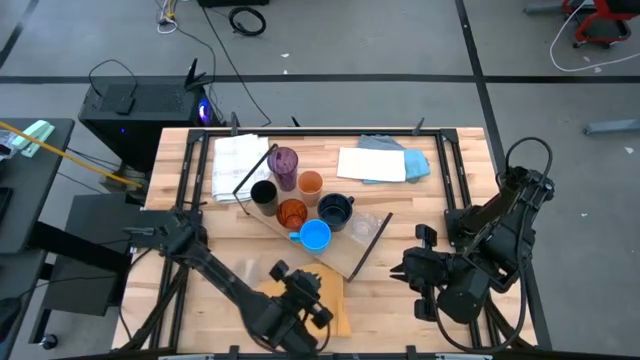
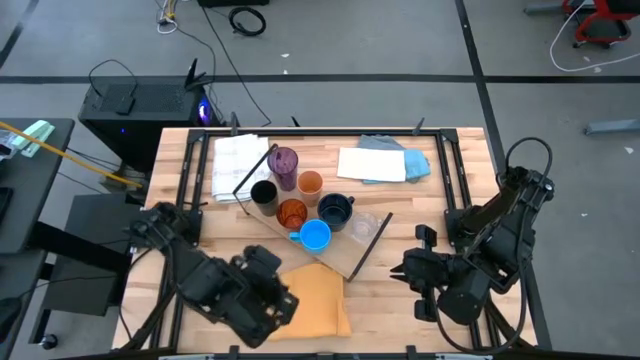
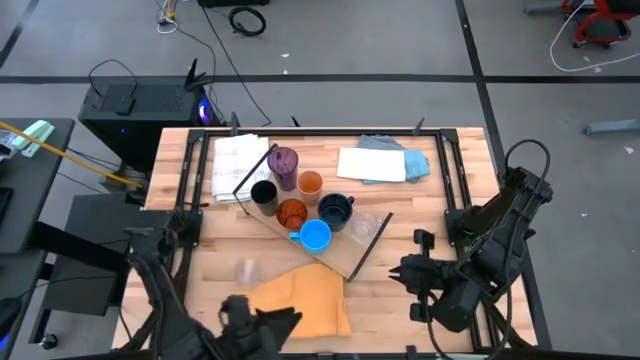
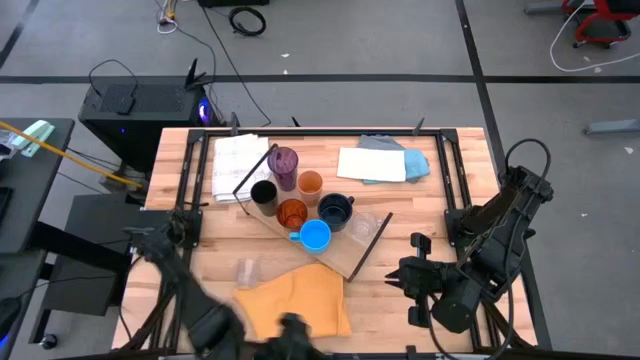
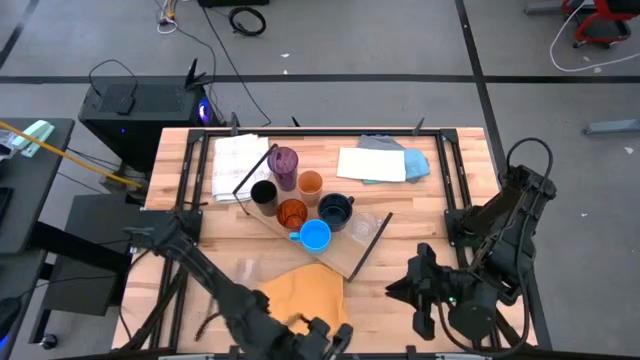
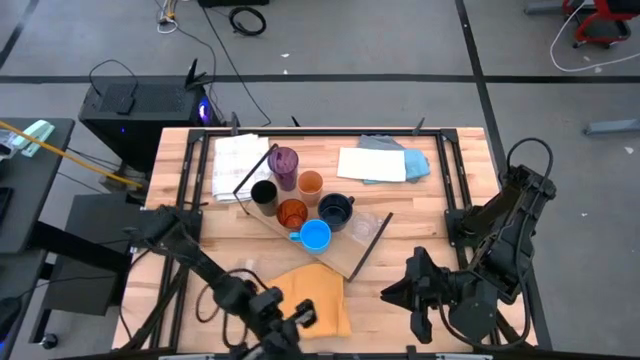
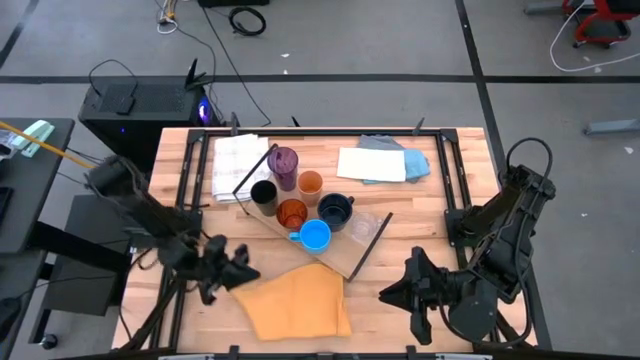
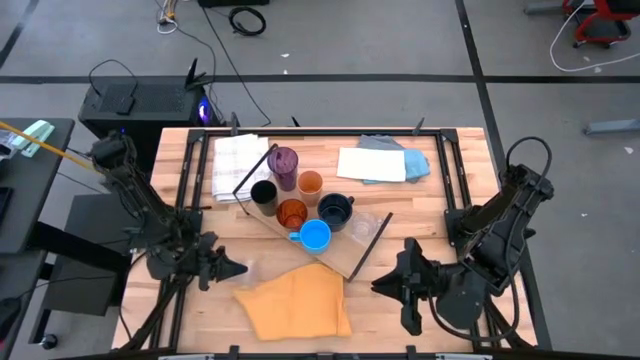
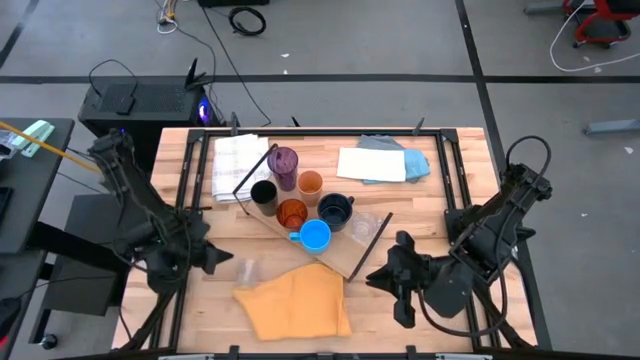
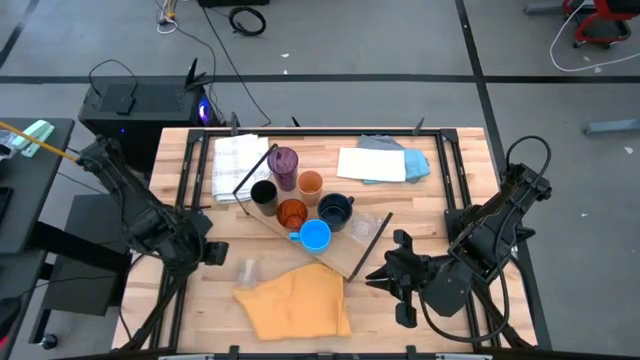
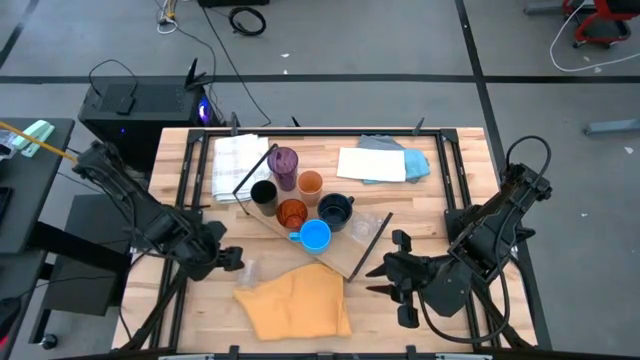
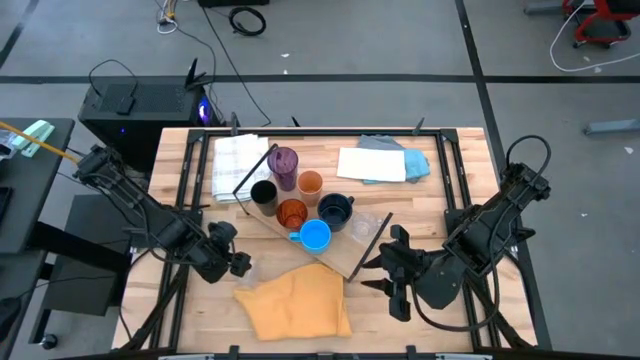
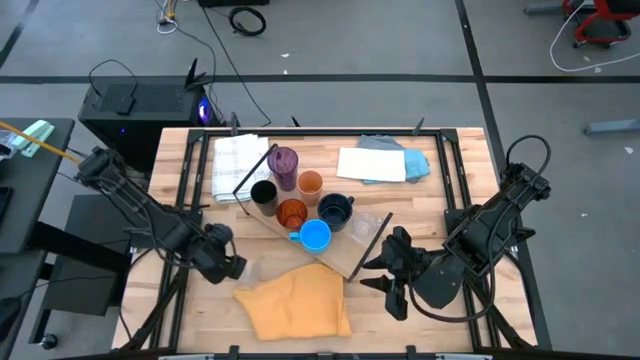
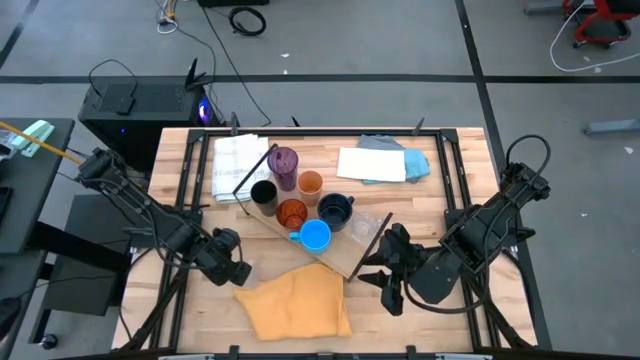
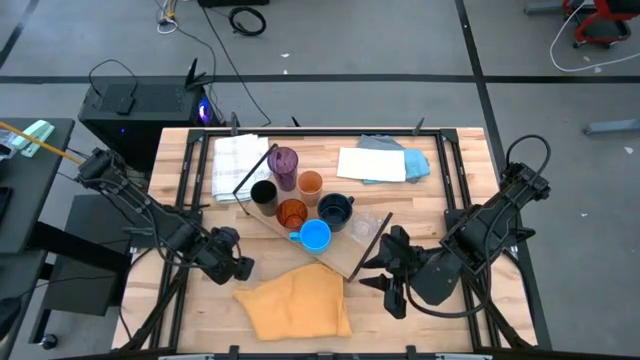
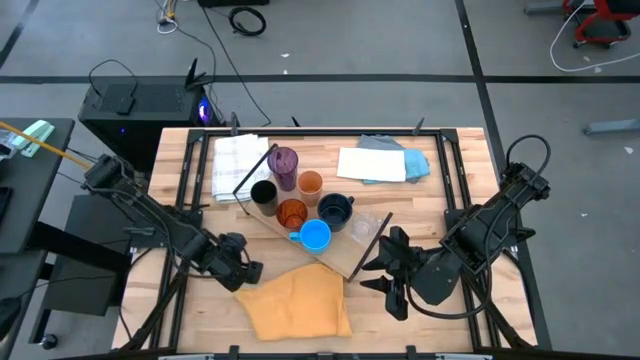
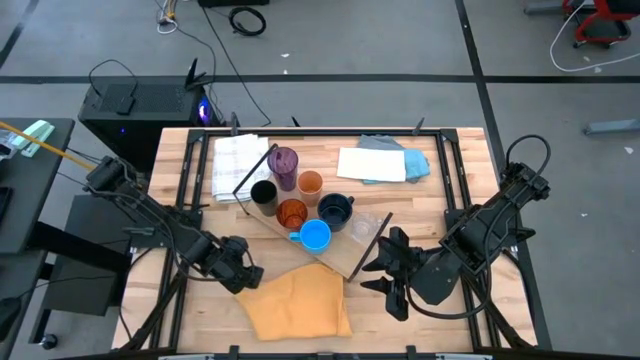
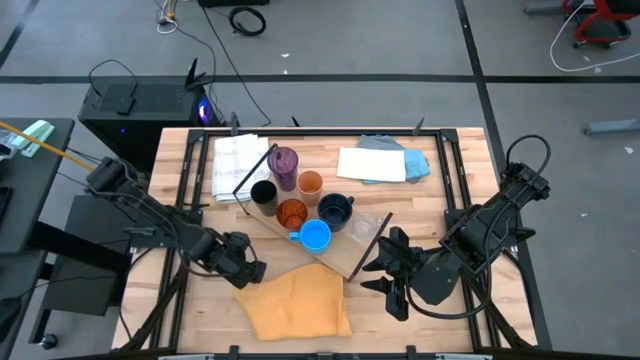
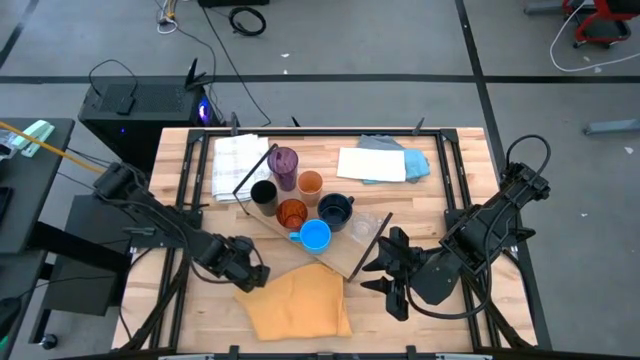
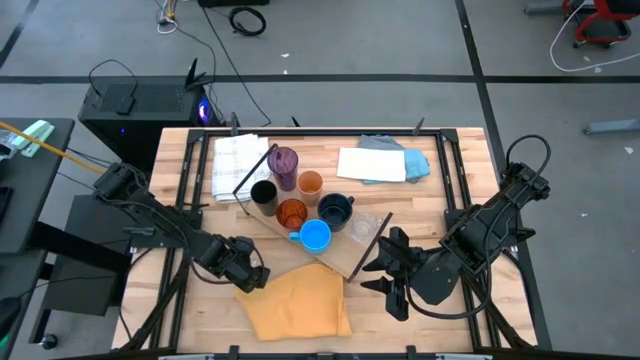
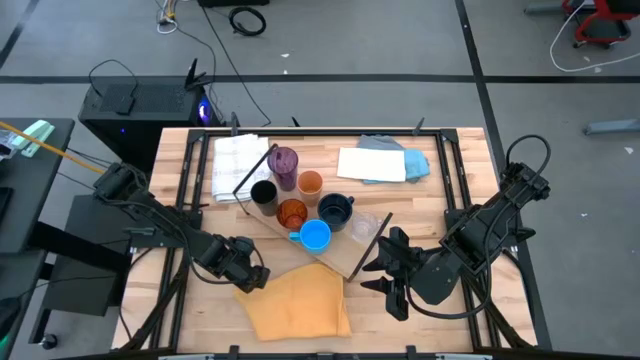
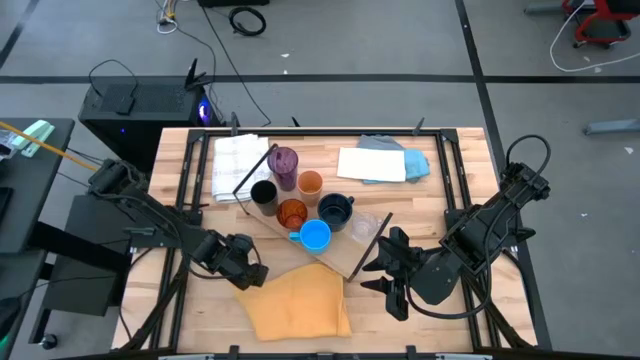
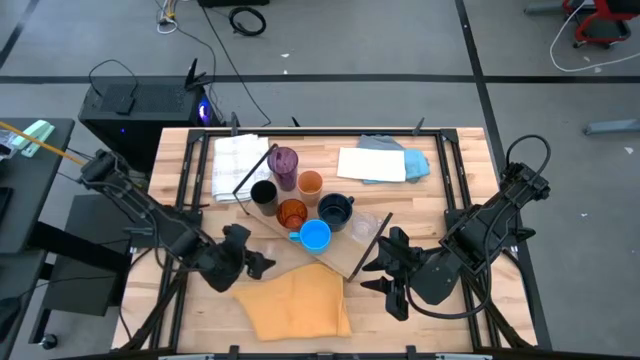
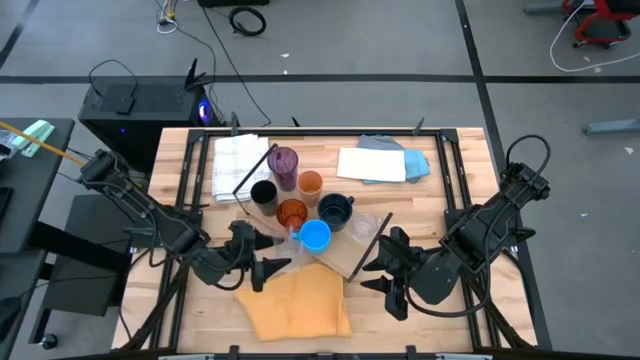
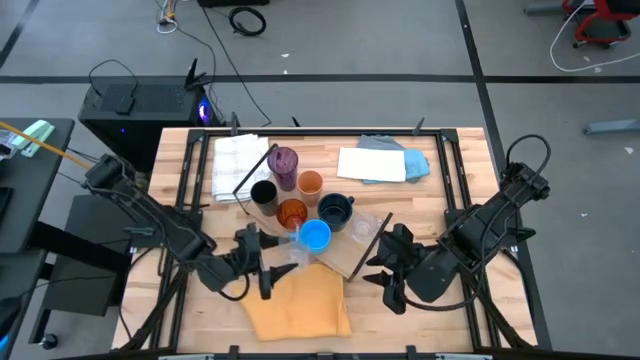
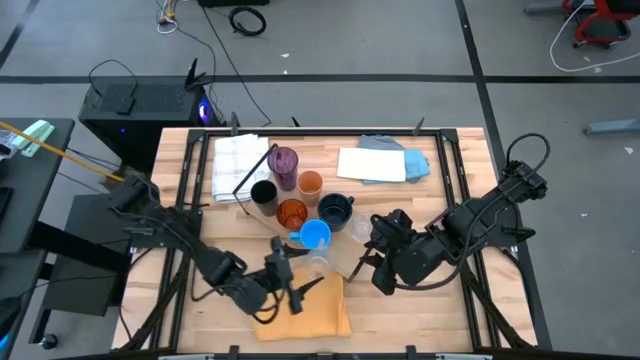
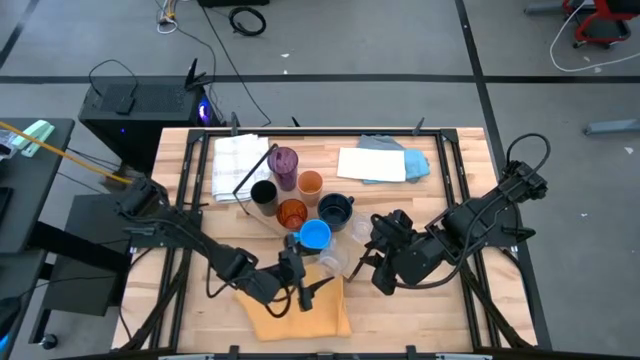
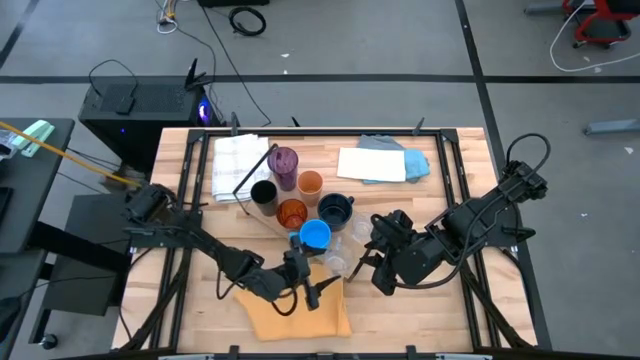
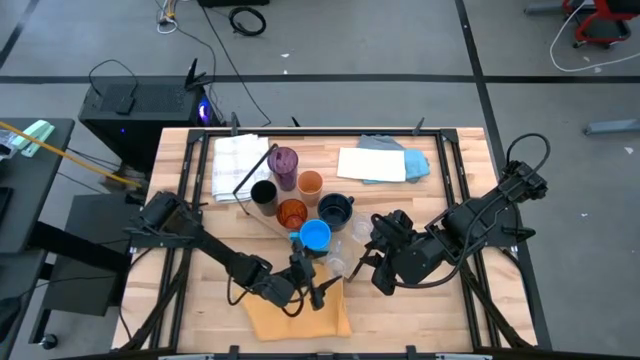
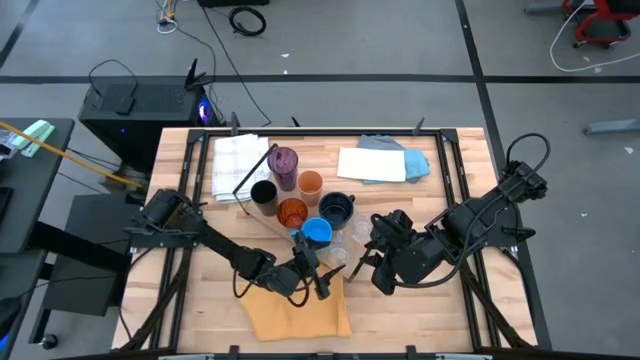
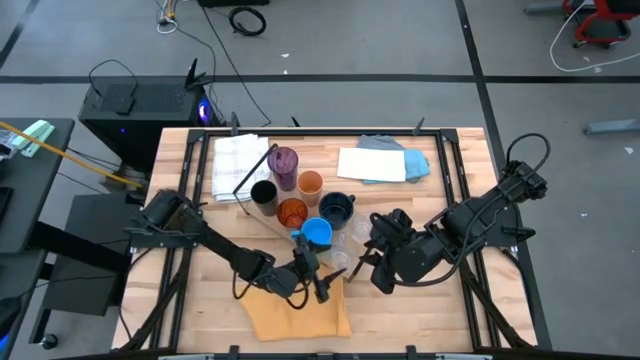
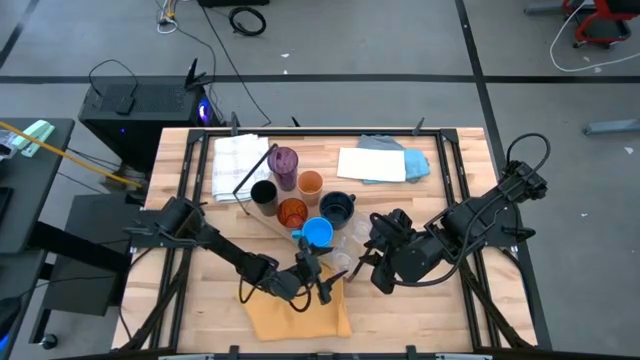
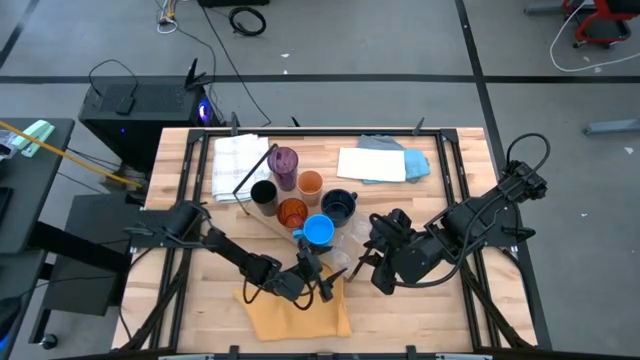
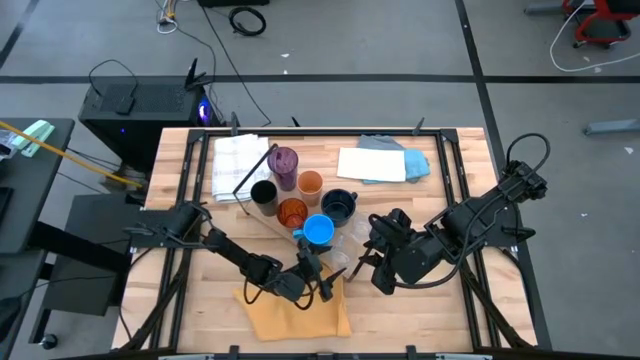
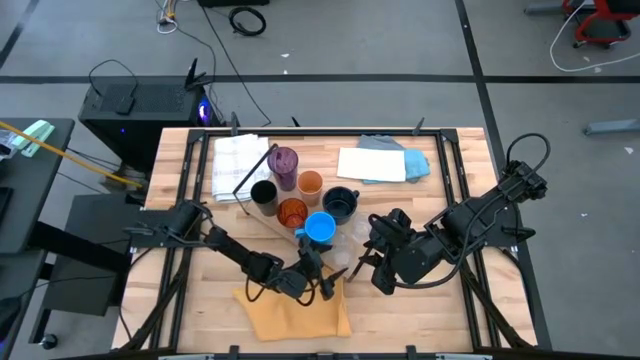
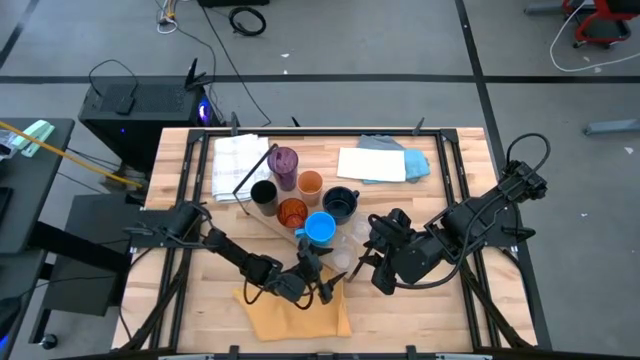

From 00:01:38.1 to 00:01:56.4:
Task: Stack small to large cups/mugs on shelf
Put the transparent mug on the shelf

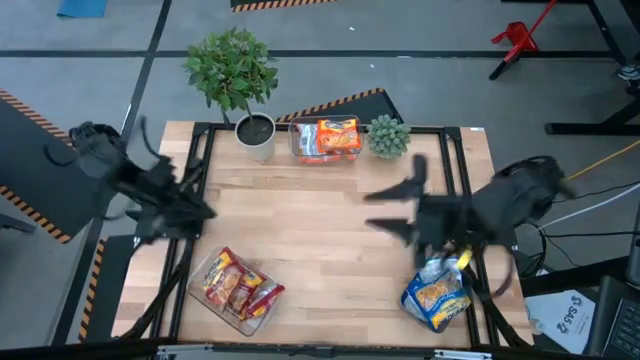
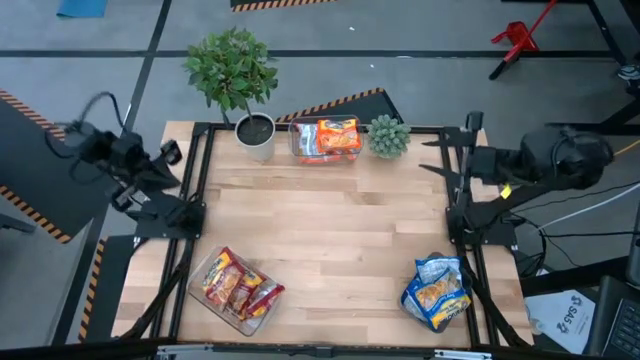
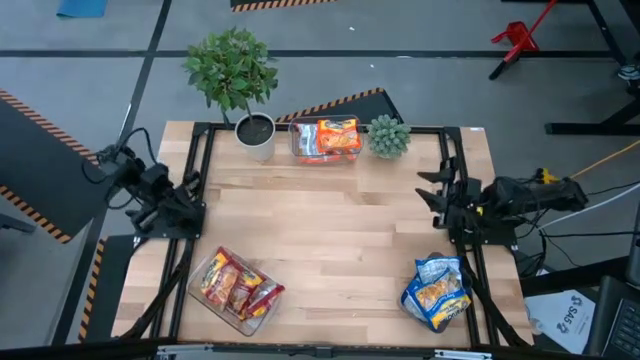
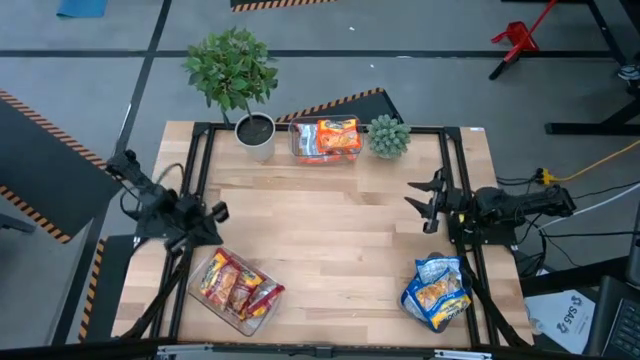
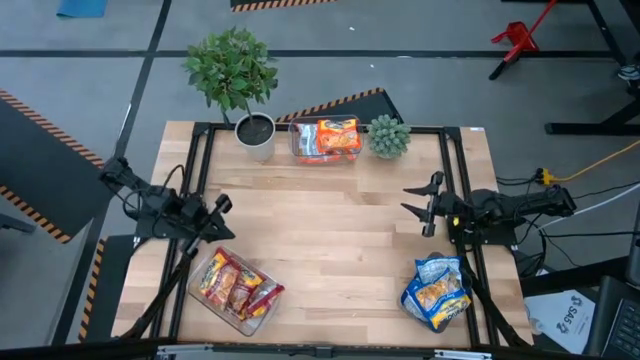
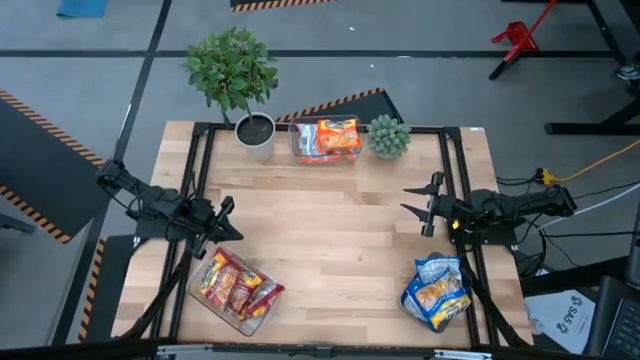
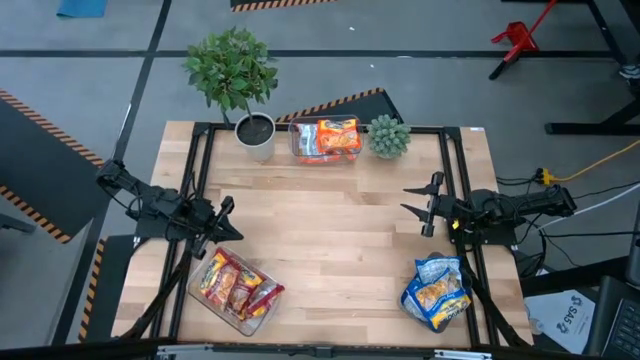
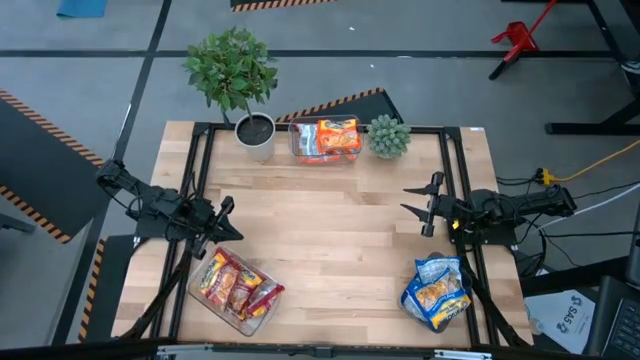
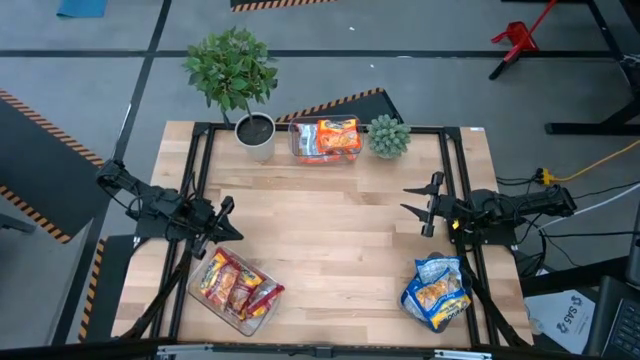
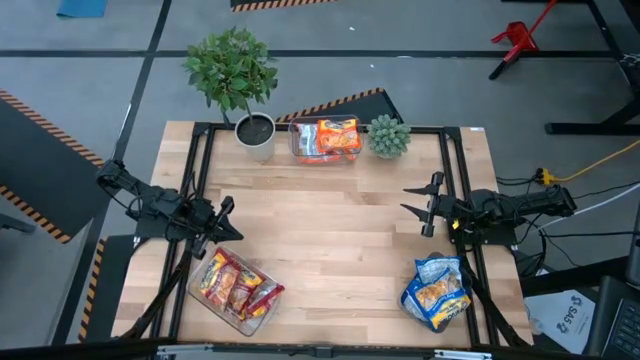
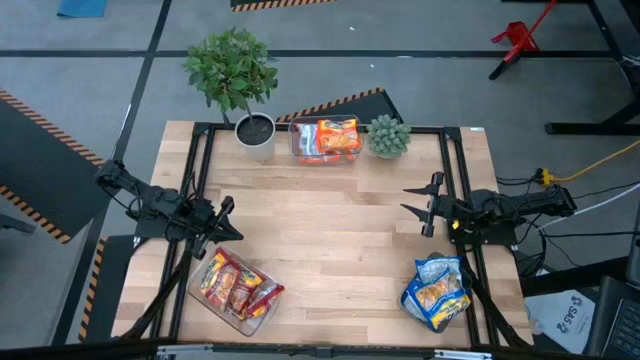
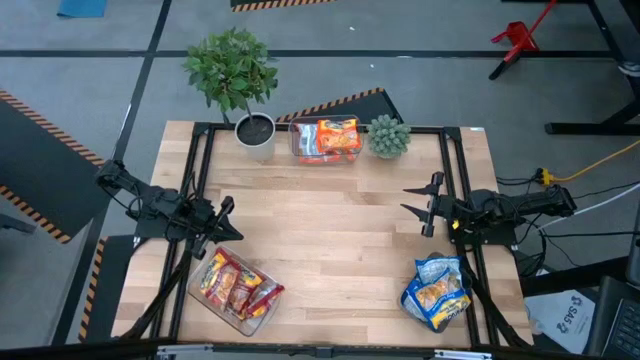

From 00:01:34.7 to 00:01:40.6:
Task: Sort Maruchan noodles
Return to Home Position
